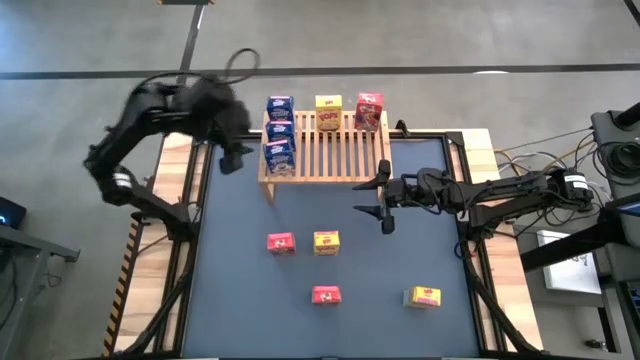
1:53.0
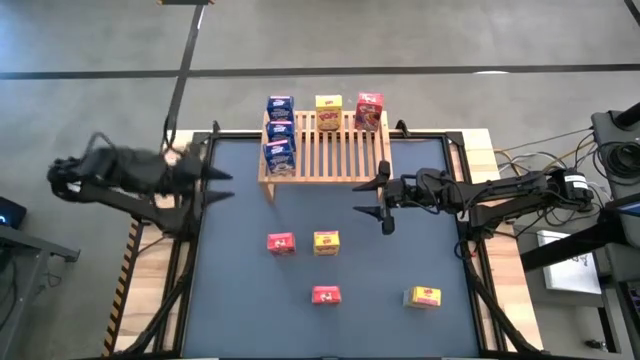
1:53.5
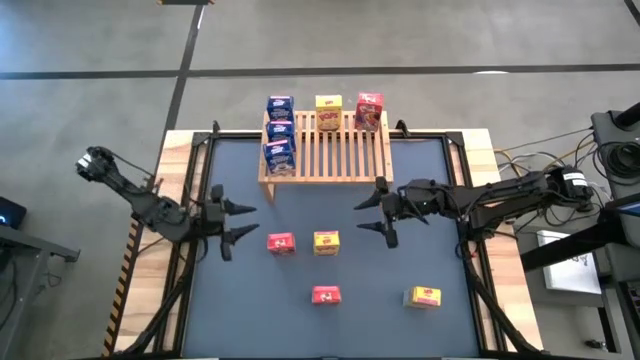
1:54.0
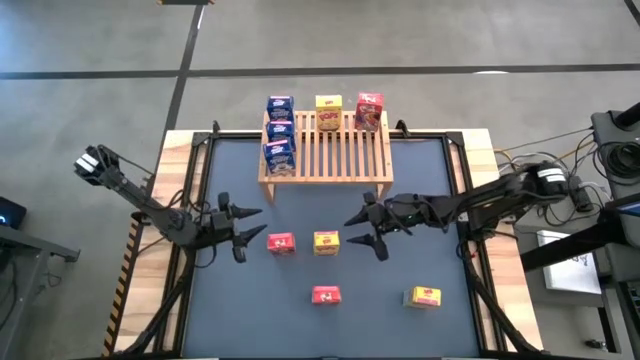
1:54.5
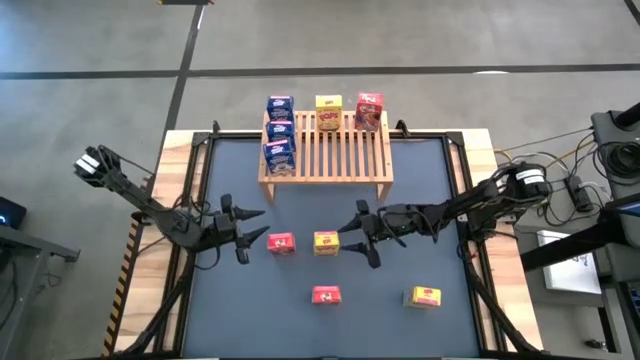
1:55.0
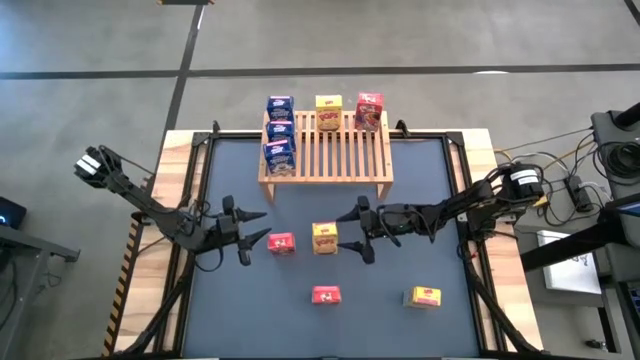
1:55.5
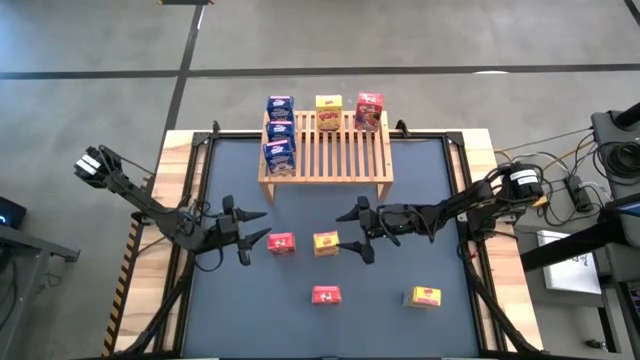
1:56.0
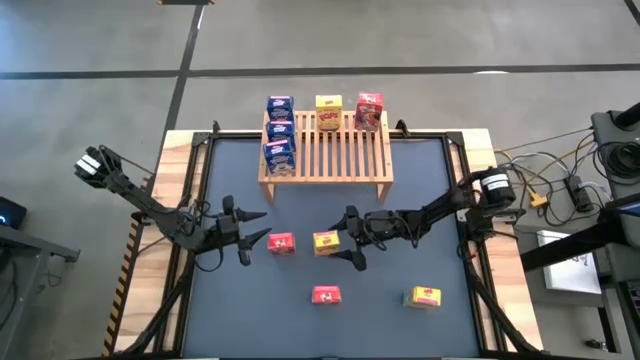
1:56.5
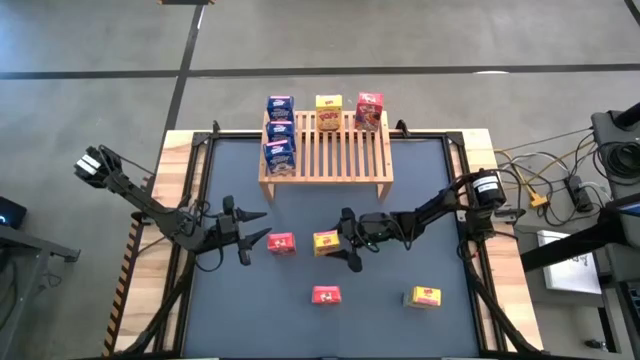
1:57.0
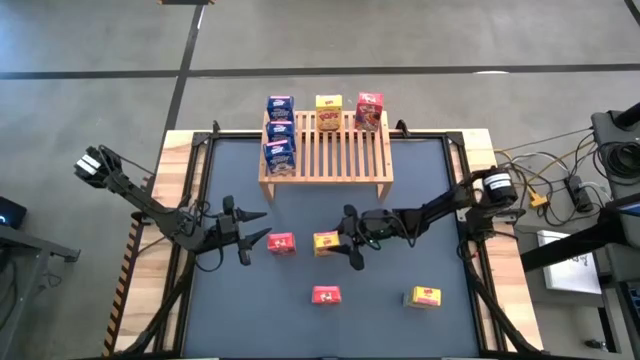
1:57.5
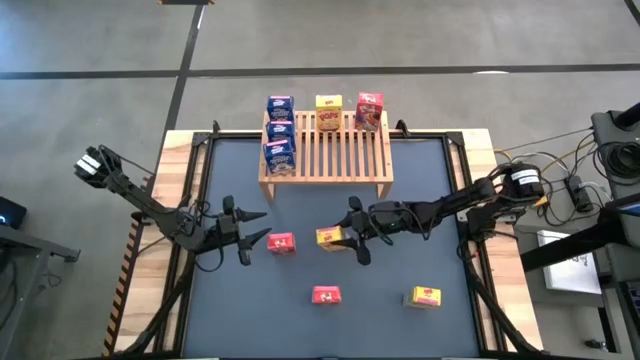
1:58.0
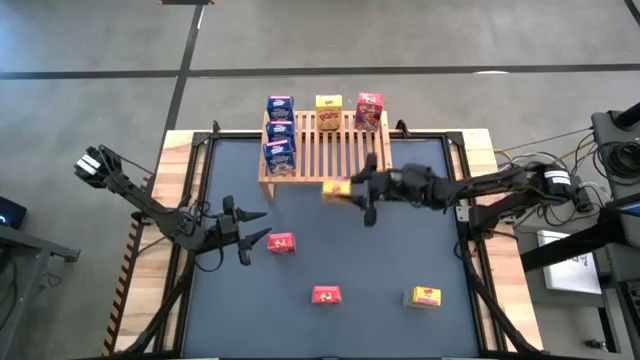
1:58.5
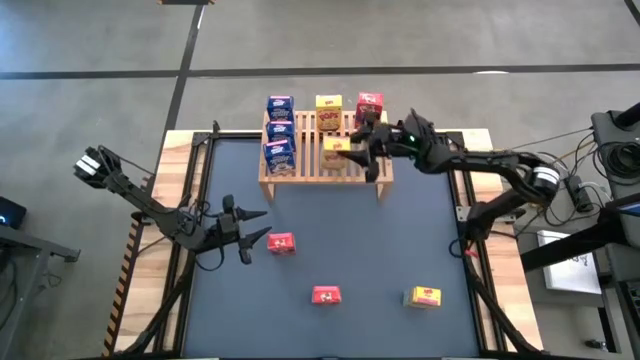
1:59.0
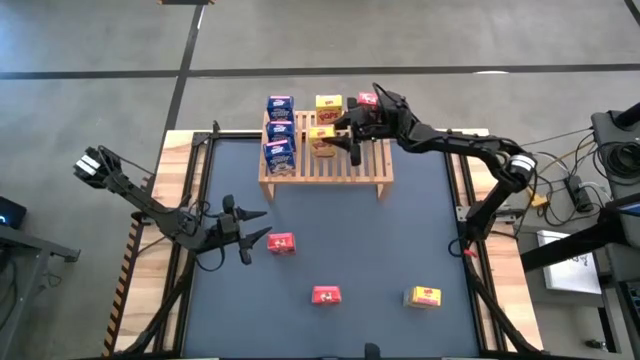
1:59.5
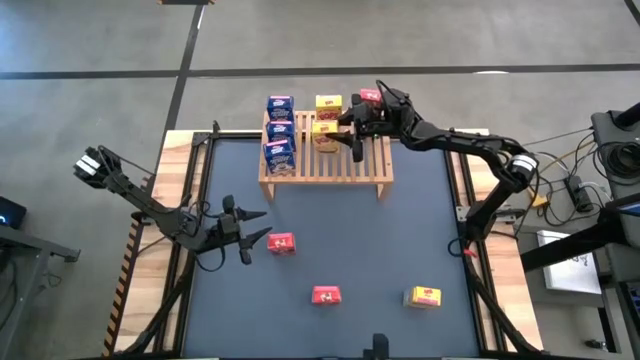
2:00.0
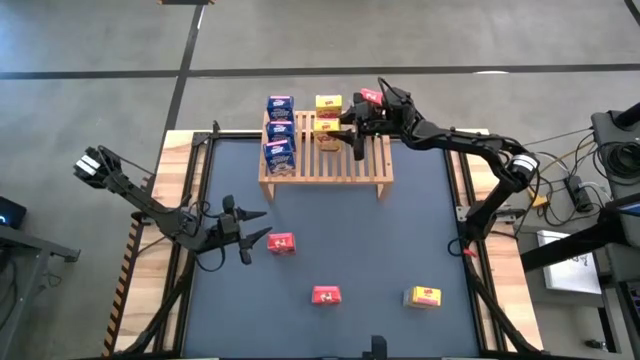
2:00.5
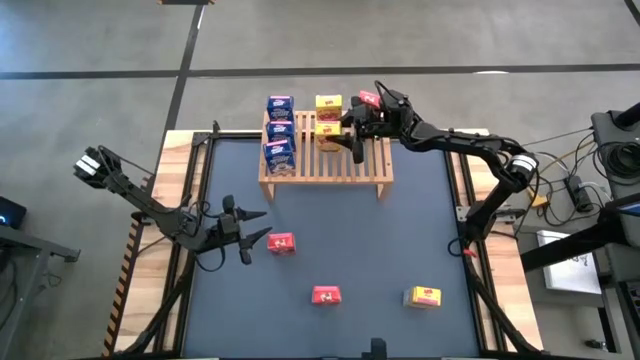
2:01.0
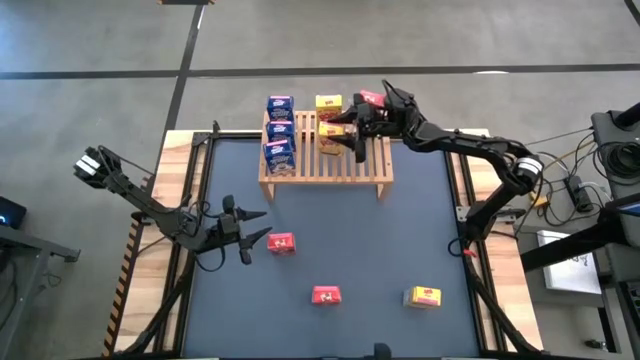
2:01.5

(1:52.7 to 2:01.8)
Task: Stack cereal on shelf
Put the top yellow cereal box on the shelf aligned with the yellow cereal box

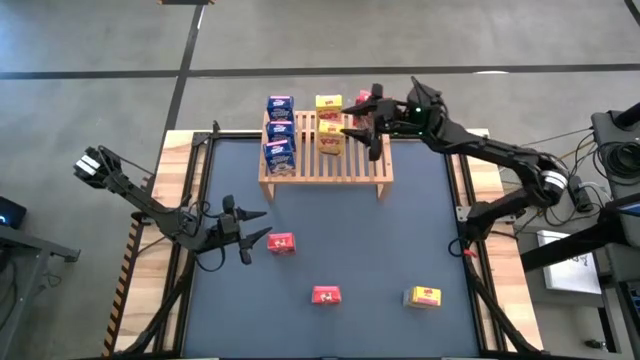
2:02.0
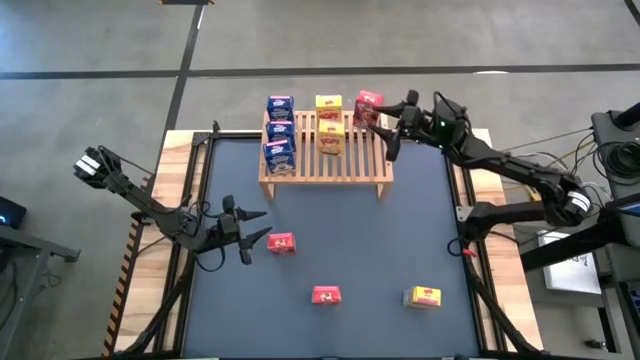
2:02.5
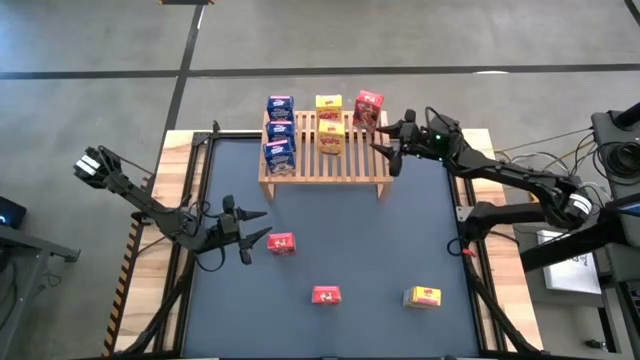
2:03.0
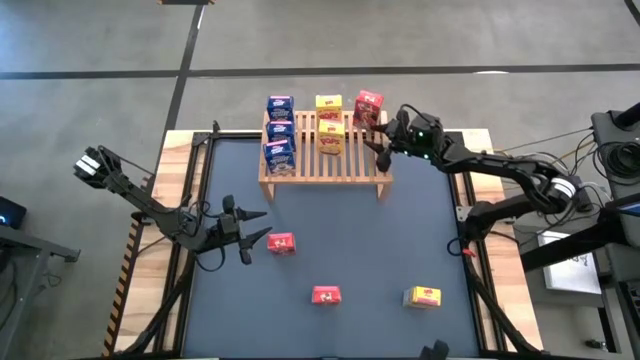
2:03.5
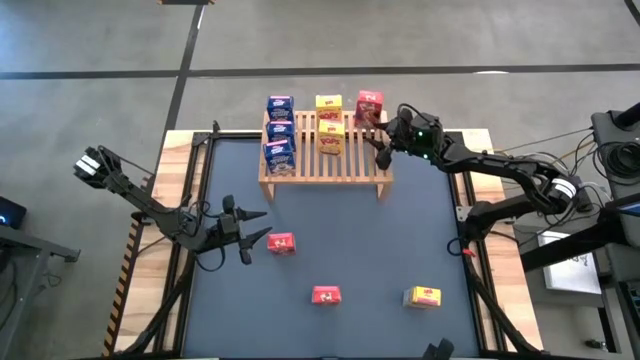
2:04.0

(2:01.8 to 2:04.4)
Adjust the red cereal box on the shelf

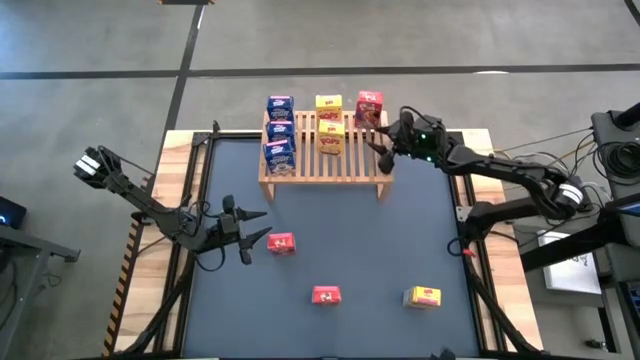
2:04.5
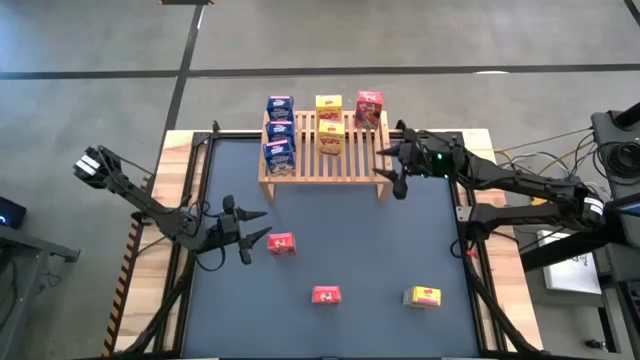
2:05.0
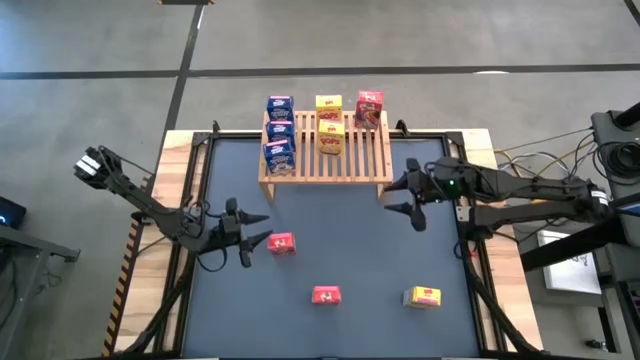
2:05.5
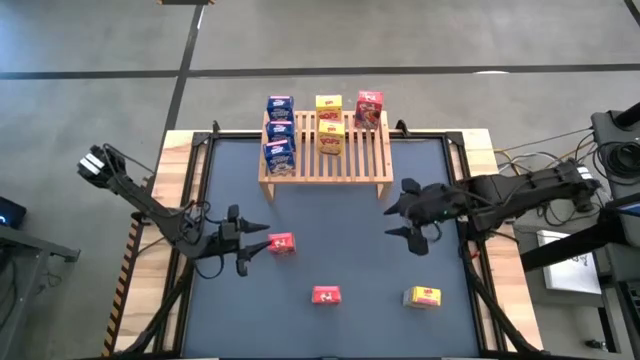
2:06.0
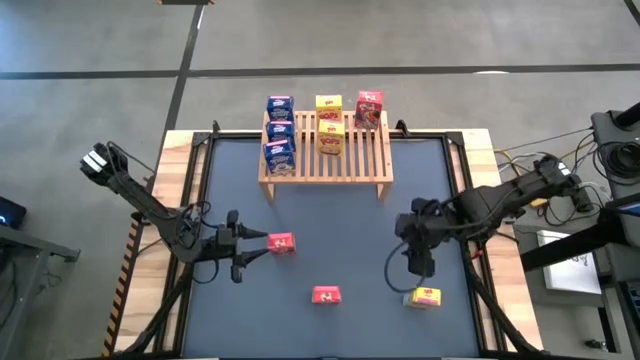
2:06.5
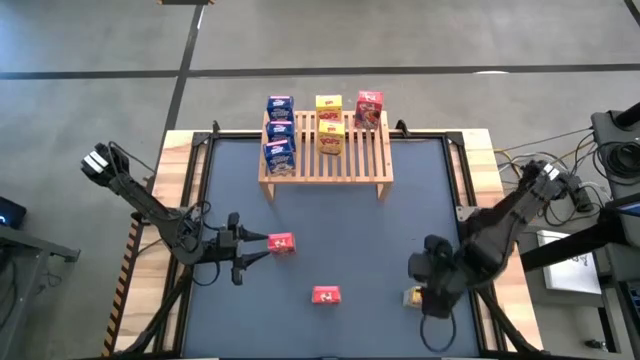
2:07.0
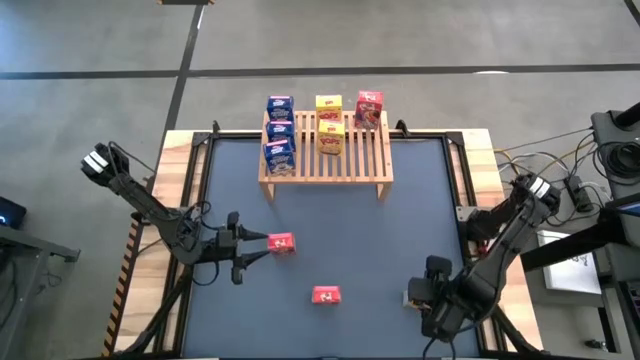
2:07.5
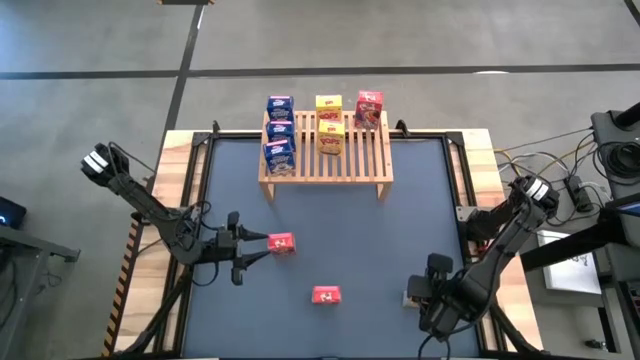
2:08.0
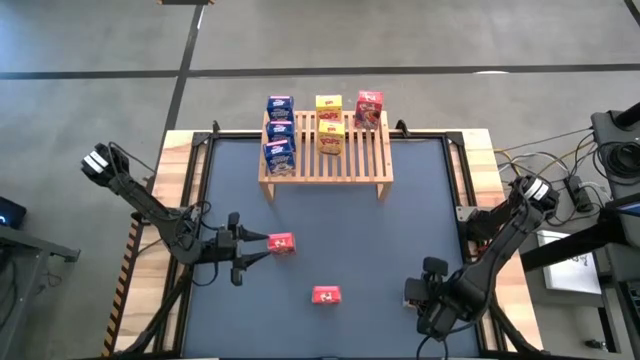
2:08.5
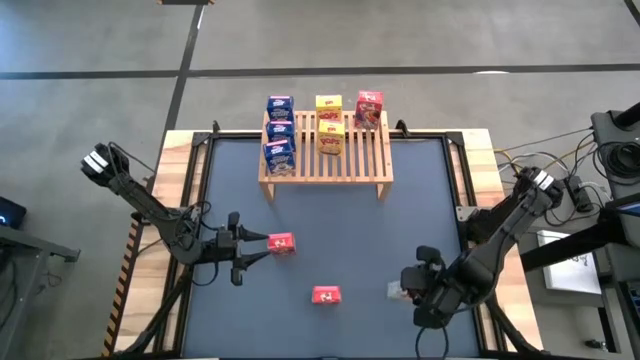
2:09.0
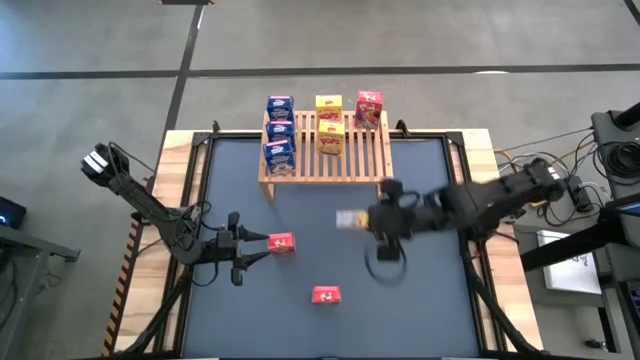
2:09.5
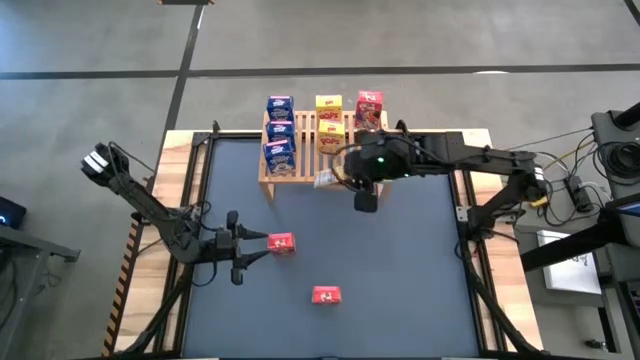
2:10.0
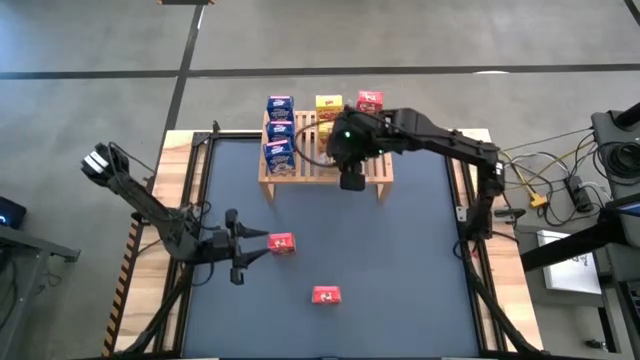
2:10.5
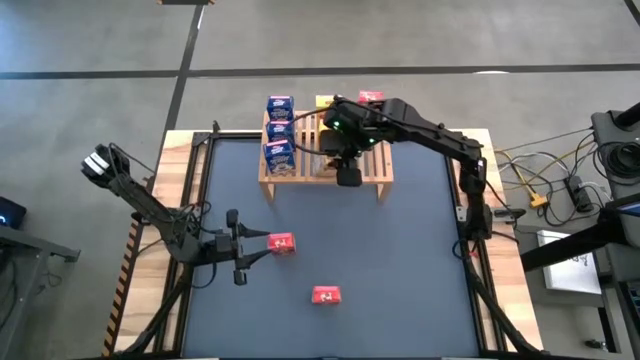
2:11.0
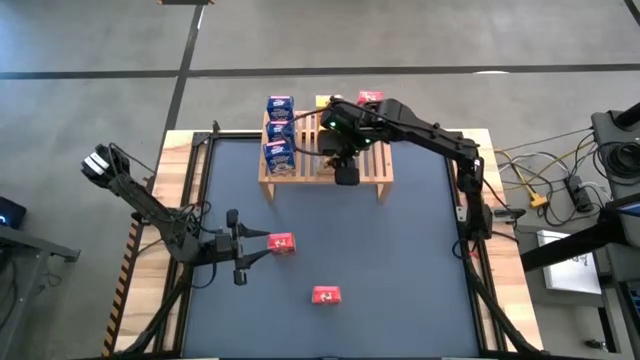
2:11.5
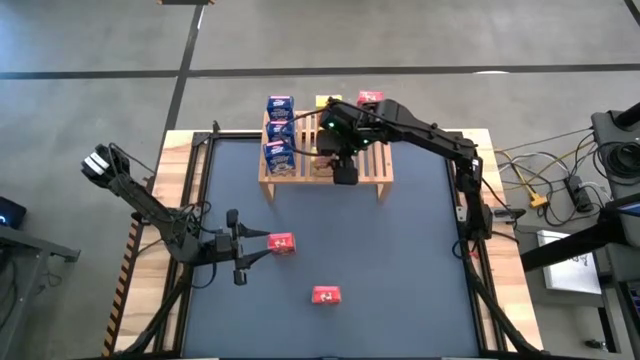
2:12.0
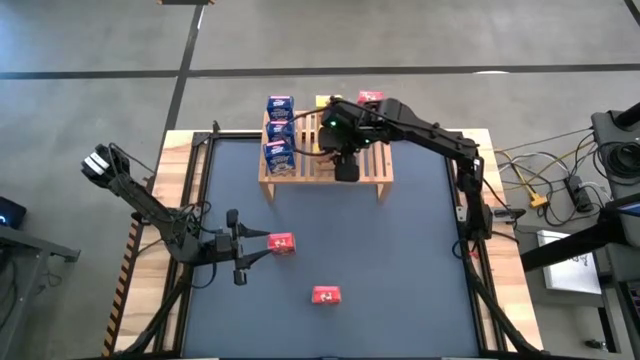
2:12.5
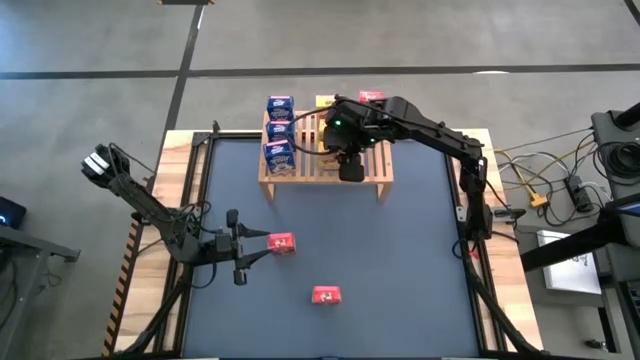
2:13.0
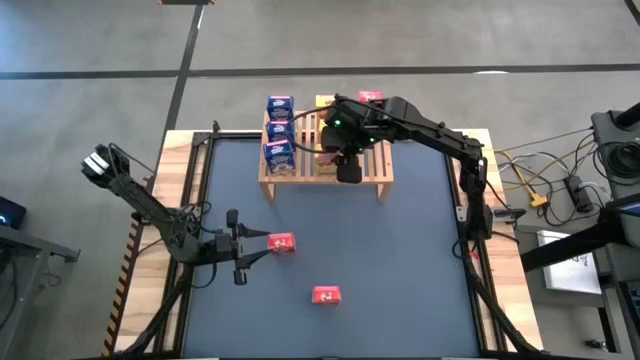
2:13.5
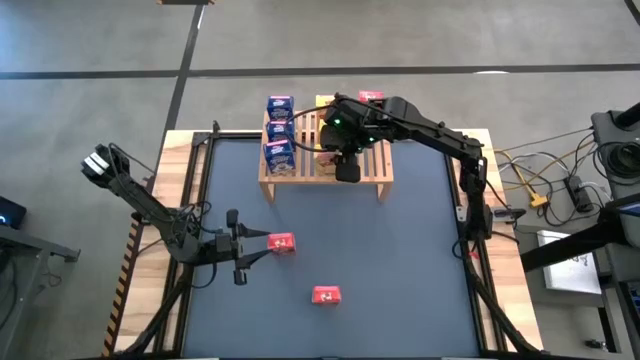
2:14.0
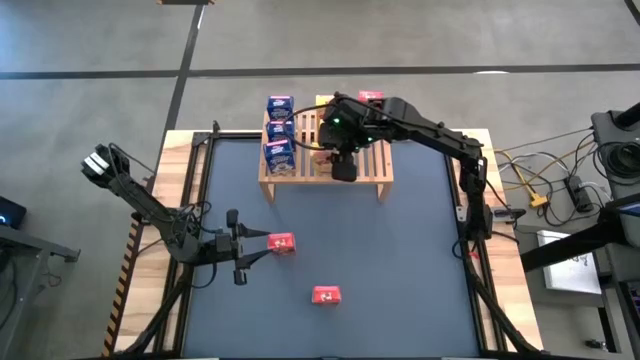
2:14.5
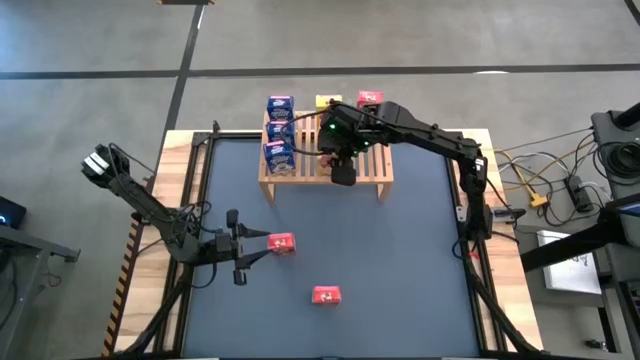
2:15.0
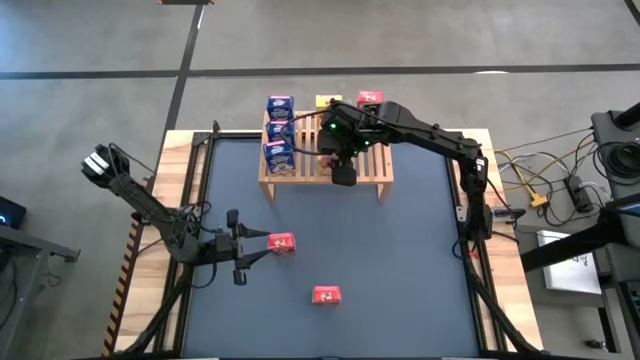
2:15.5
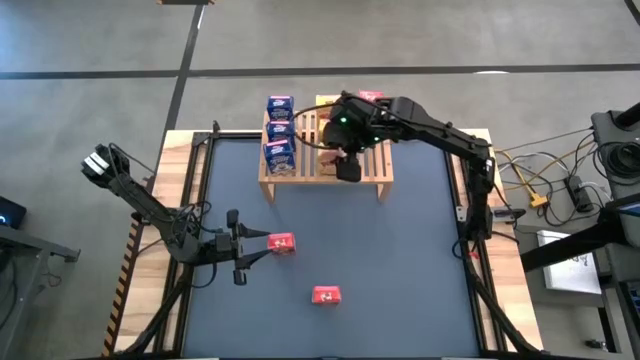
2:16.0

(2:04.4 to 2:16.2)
Put the yellow cereal box on the shelf aligned with the yellow cereal boxes
